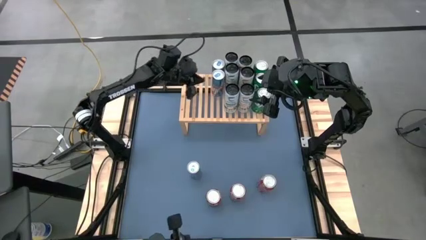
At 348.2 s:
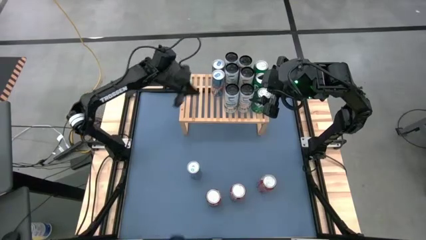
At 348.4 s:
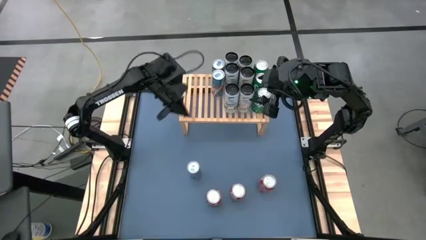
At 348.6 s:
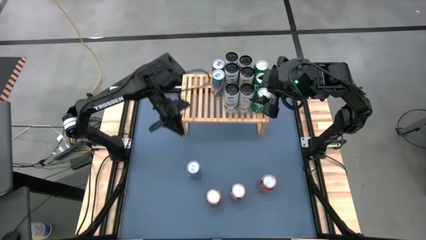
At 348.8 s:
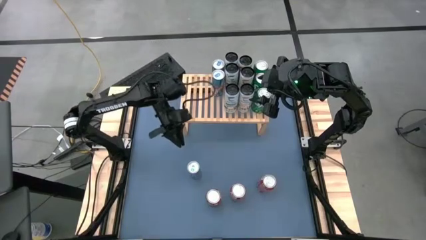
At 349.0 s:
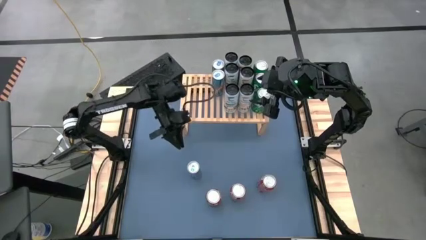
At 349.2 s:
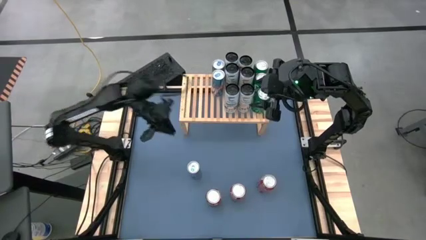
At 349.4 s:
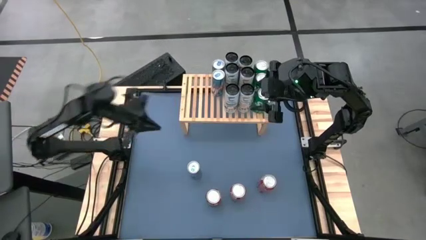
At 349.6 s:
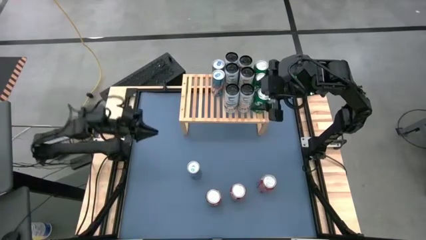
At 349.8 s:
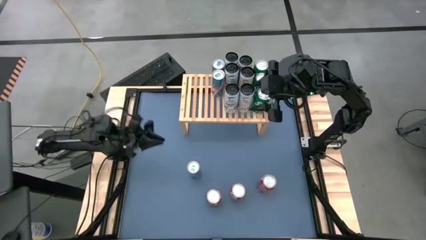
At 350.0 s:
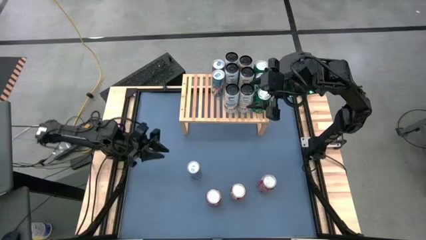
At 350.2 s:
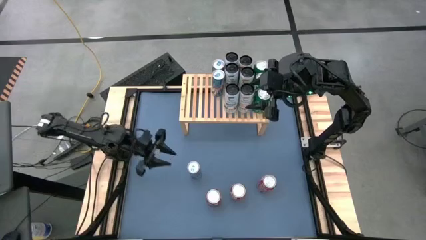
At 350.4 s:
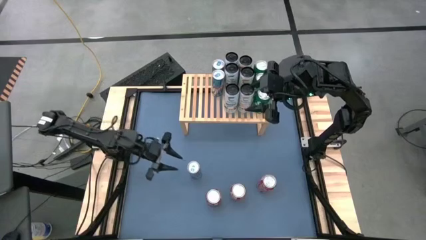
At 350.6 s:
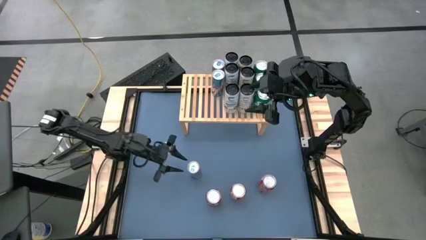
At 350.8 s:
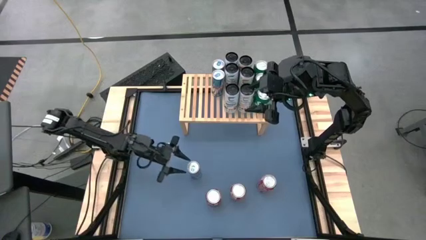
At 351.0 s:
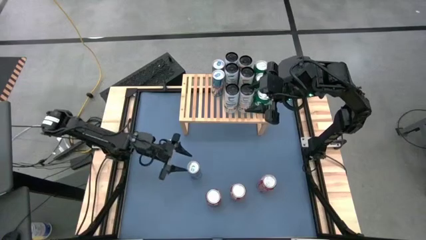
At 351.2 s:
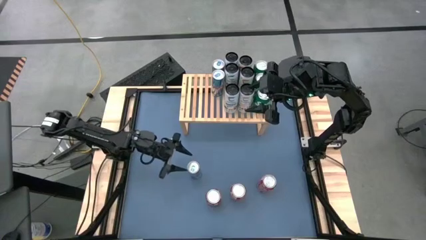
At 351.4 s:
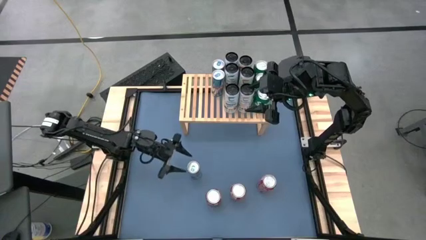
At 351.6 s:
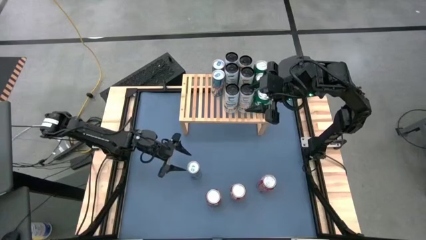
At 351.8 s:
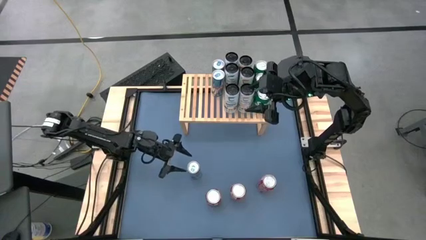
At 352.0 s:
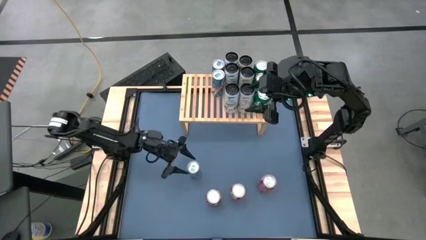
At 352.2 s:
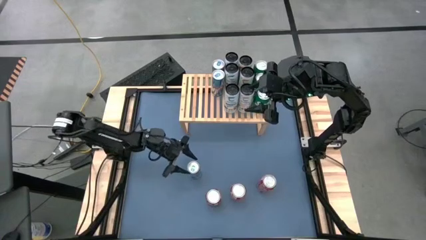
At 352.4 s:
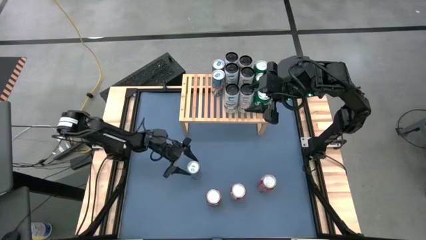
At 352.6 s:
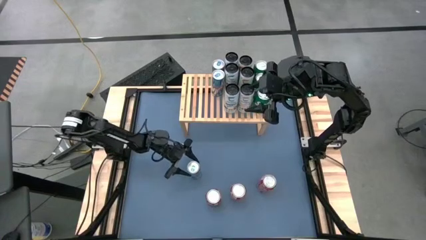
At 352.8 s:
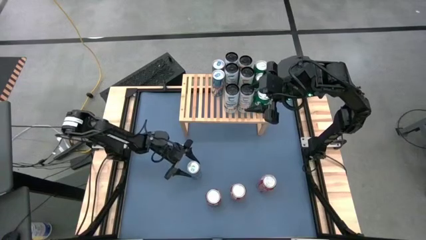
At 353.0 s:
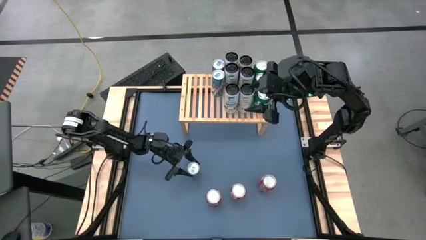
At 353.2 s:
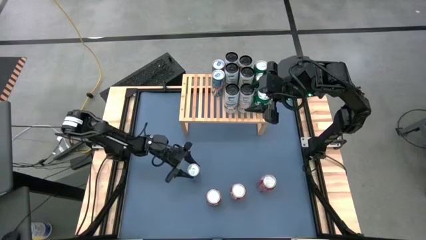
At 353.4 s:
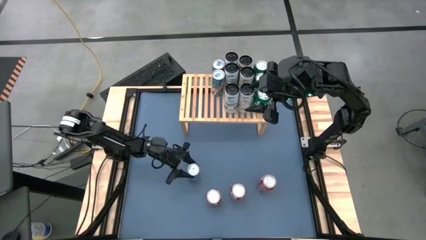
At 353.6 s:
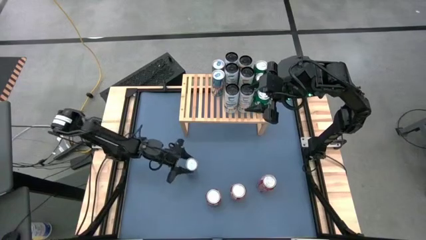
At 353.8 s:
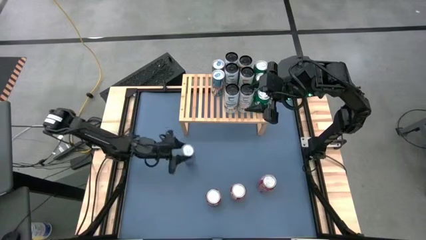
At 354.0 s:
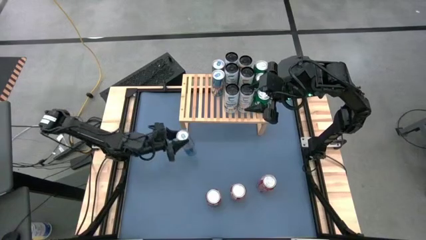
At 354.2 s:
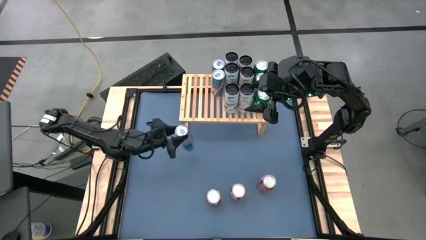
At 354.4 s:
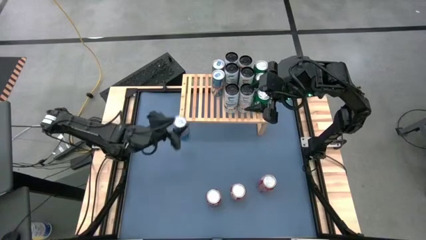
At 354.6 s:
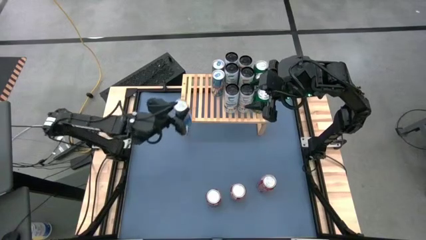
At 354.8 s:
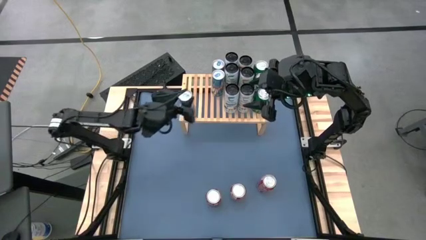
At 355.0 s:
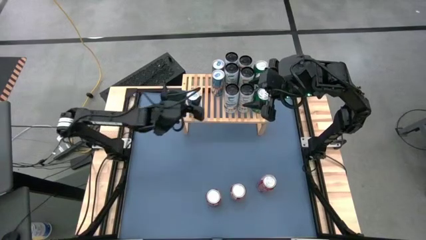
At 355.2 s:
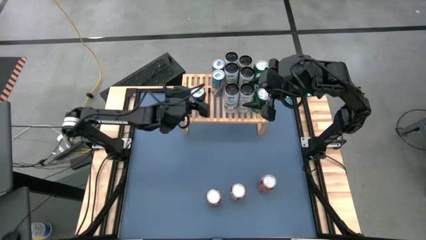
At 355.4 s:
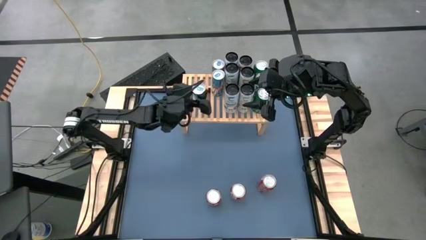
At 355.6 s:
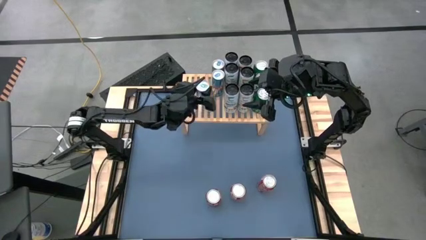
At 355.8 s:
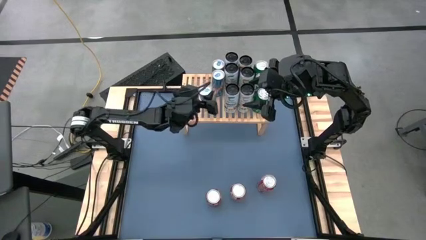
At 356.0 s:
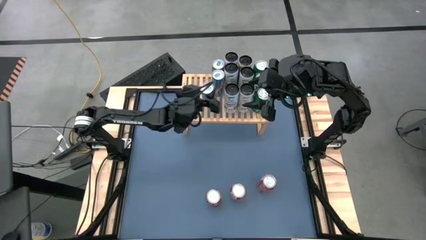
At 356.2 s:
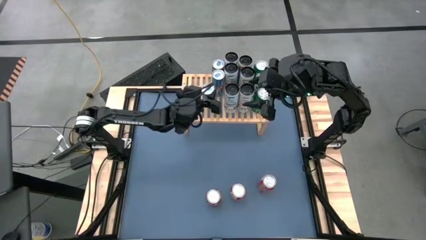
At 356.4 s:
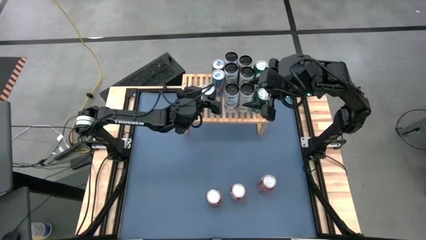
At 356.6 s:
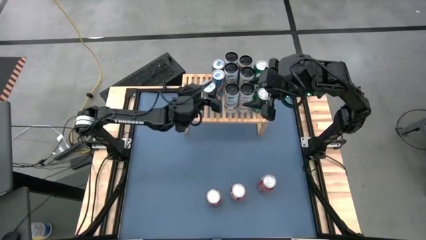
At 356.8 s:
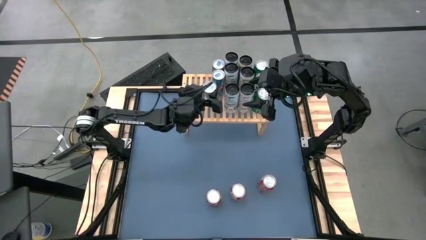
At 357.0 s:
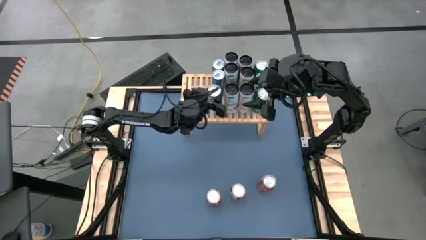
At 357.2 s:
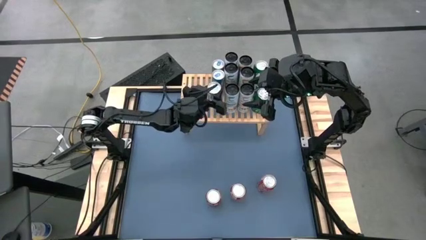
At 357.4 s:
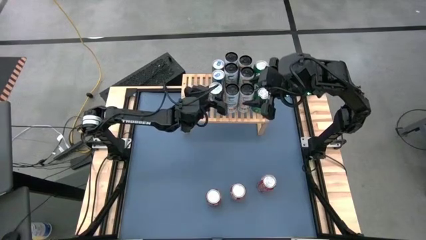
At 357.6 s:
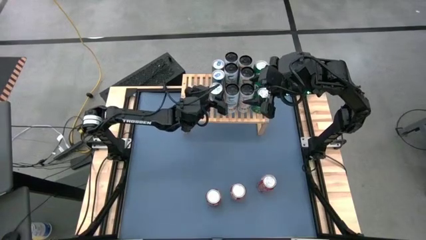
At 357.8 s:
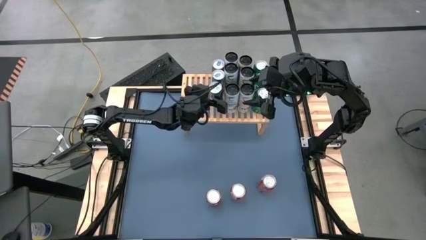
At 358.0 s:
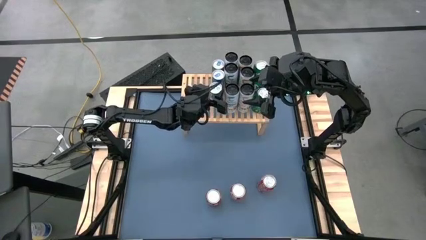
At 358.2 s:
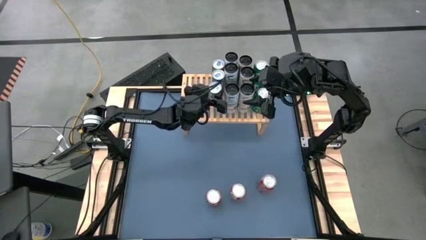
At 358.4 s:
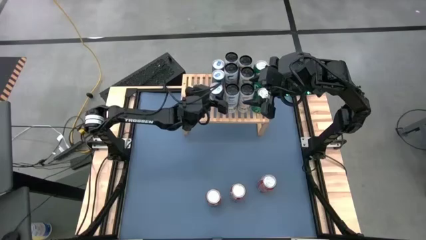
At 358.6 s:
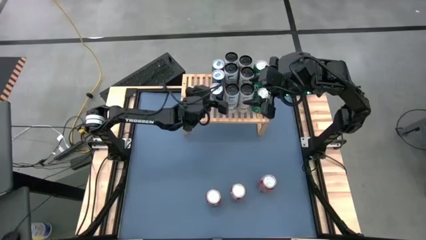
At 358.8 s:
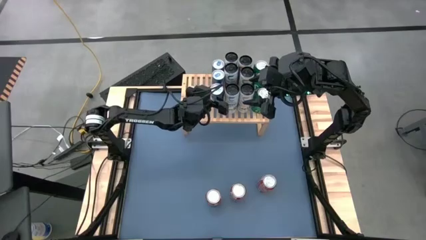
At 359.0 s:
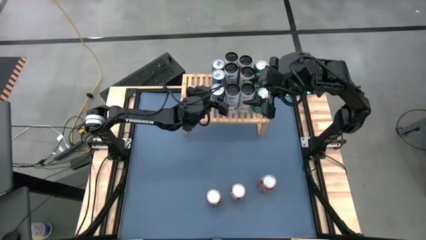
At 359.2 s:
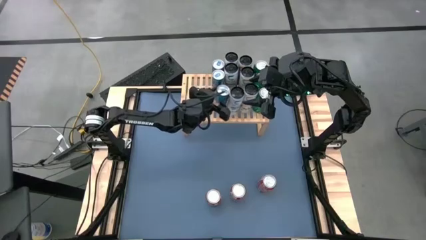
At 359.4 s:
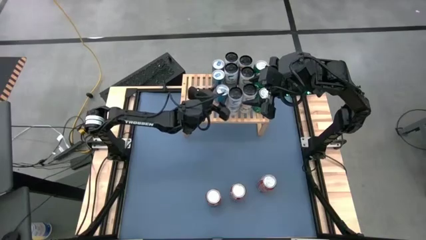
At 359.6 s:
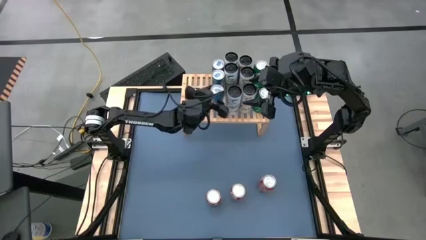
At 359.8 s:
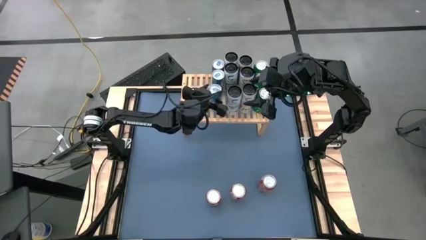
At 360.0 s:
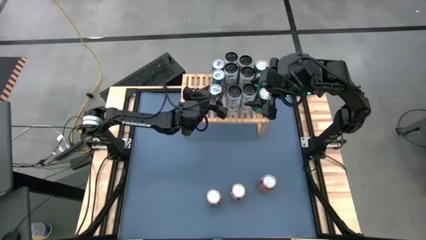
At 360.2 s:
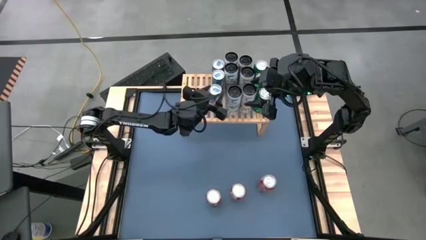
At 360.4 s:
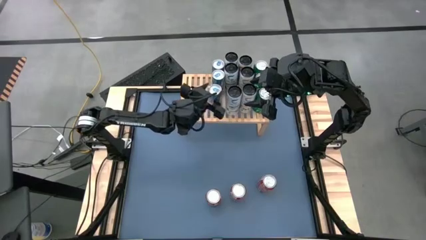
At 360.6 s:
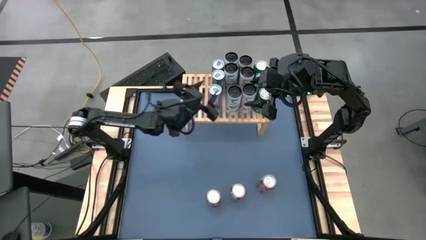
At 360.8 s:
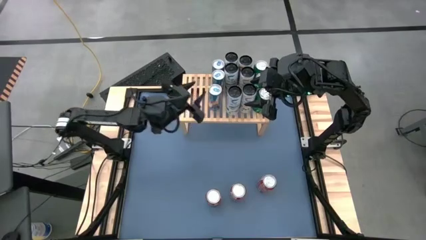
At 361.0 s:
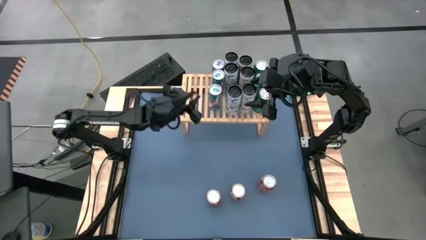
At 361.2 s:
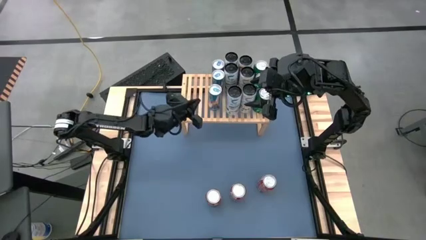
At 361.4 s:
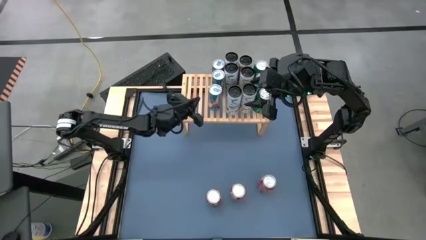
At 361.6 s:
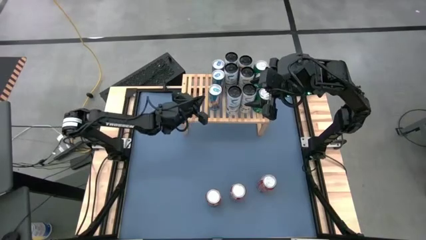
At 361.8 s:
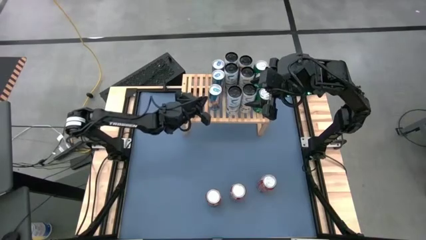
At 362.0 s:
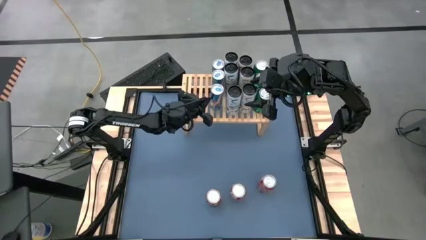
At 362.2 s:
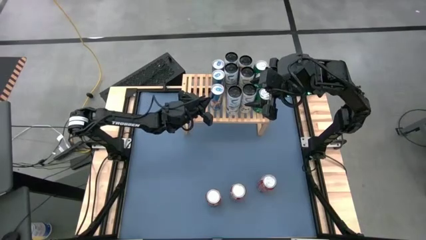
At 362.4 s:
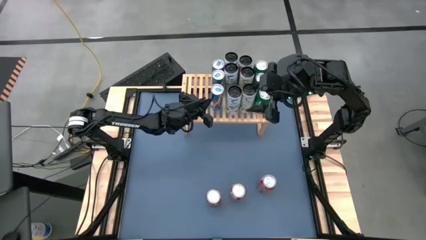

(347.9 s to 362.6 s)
Task: Place canned beverage on shelf
Put the blue soda can on the shelf aligned with the other blue soda can
